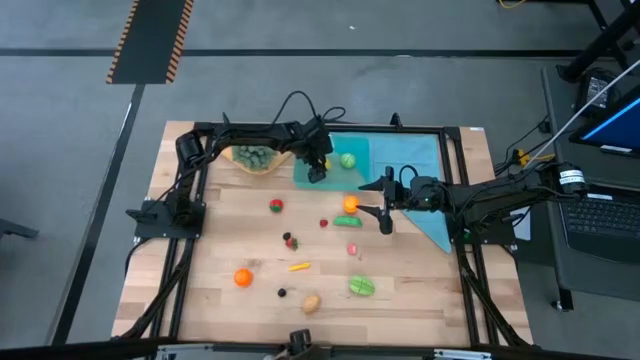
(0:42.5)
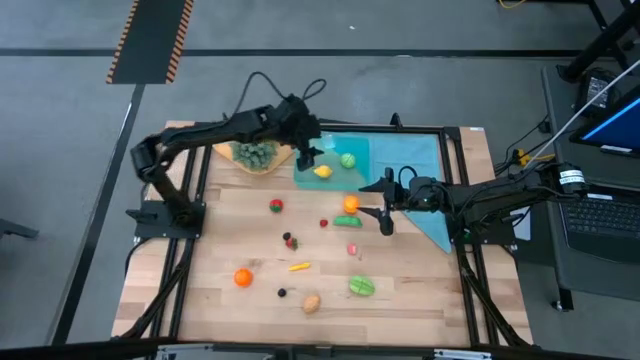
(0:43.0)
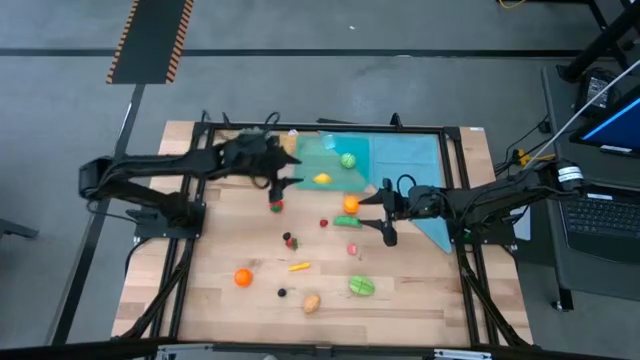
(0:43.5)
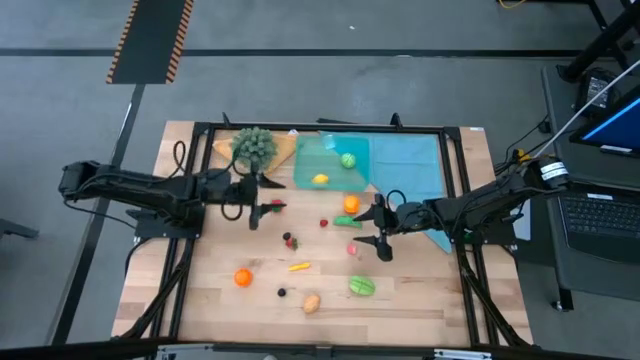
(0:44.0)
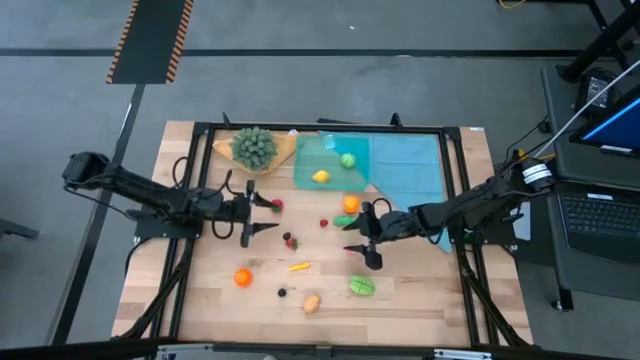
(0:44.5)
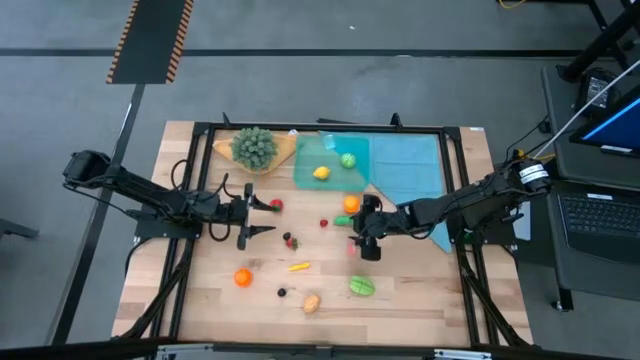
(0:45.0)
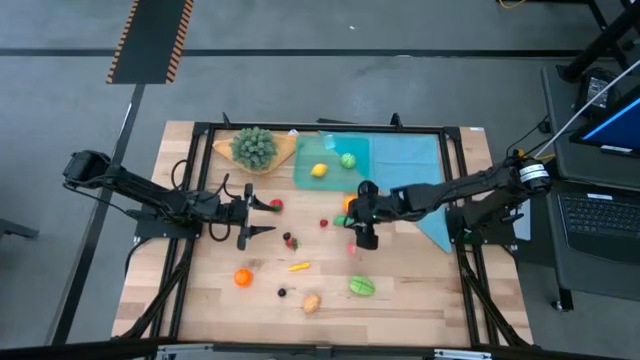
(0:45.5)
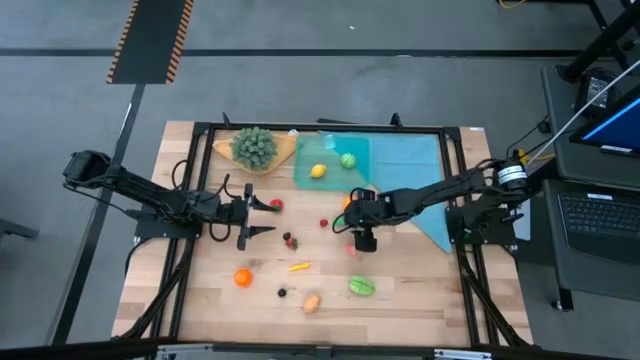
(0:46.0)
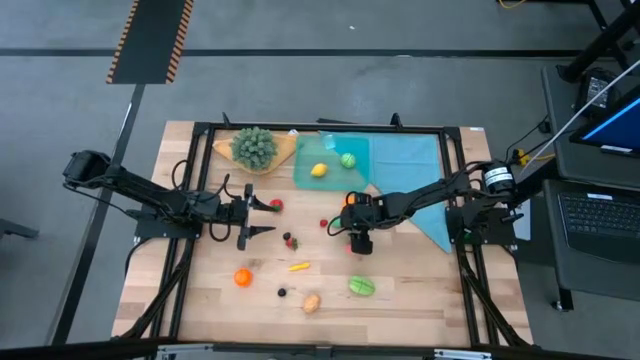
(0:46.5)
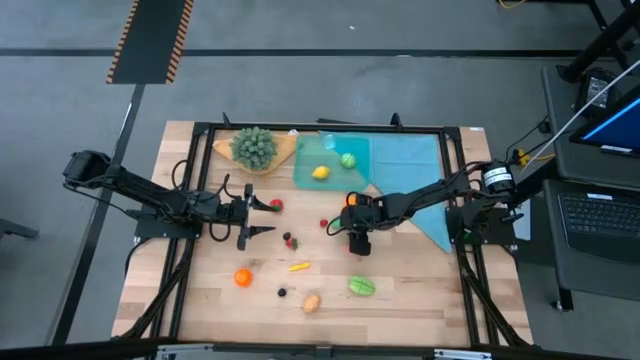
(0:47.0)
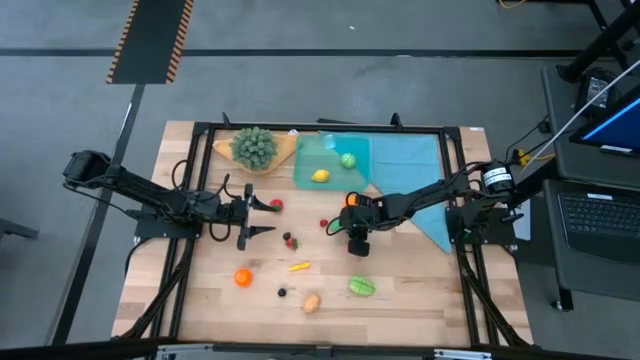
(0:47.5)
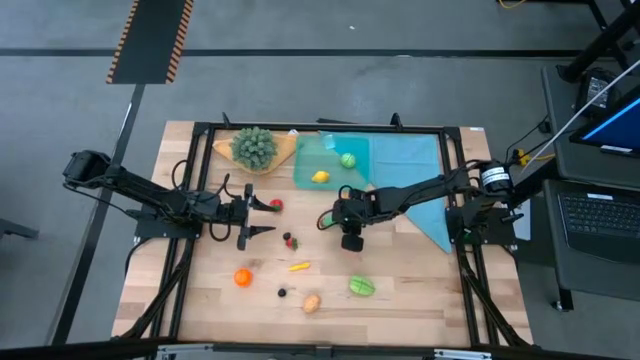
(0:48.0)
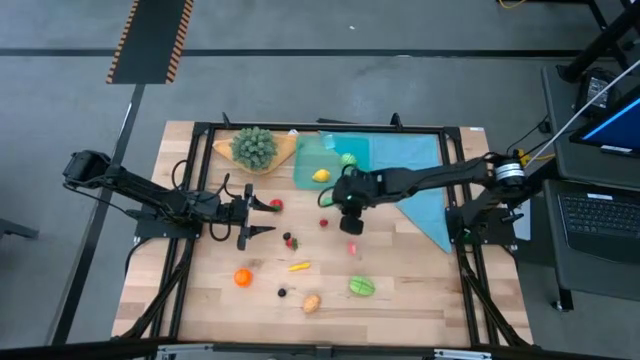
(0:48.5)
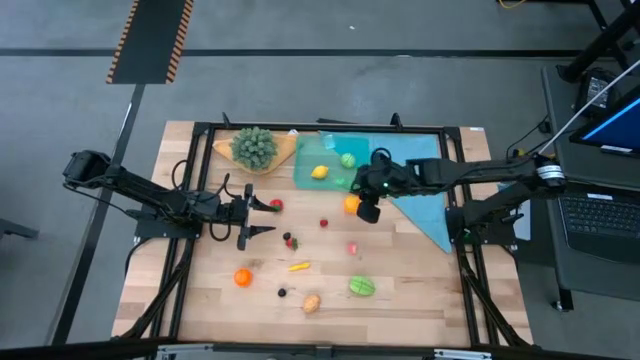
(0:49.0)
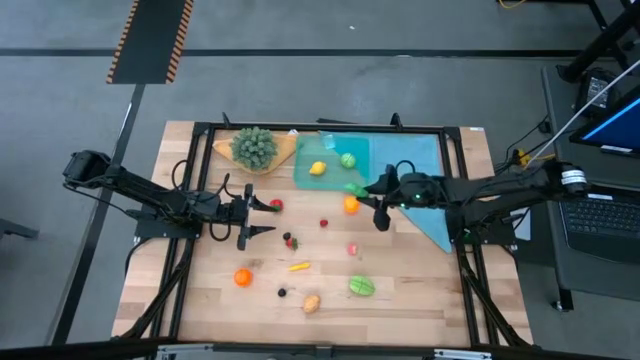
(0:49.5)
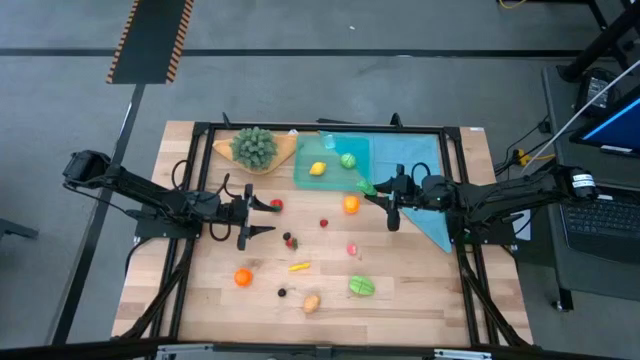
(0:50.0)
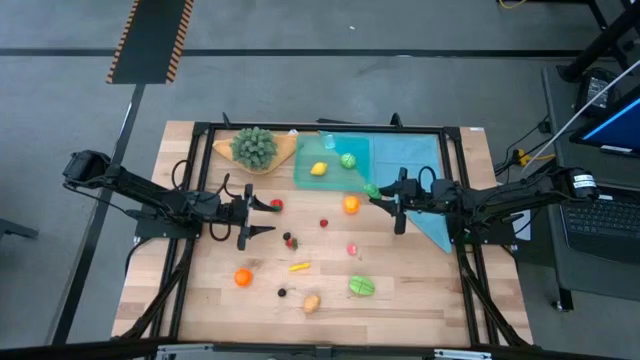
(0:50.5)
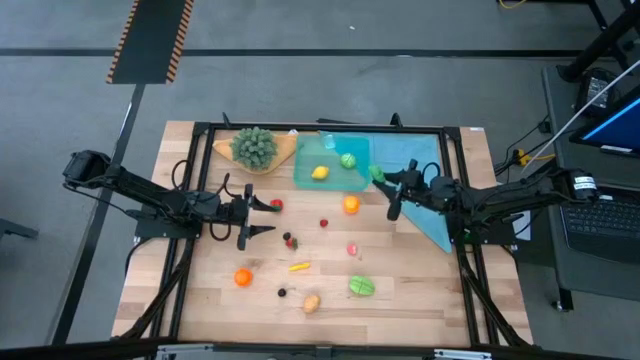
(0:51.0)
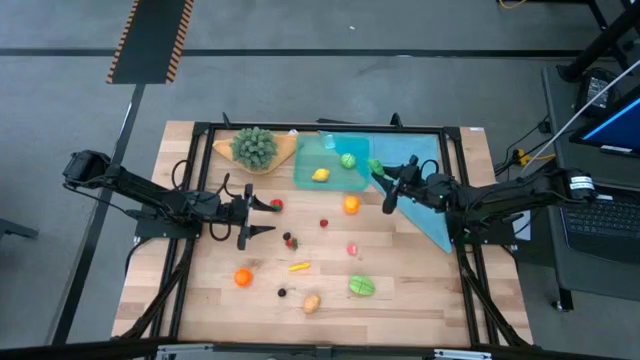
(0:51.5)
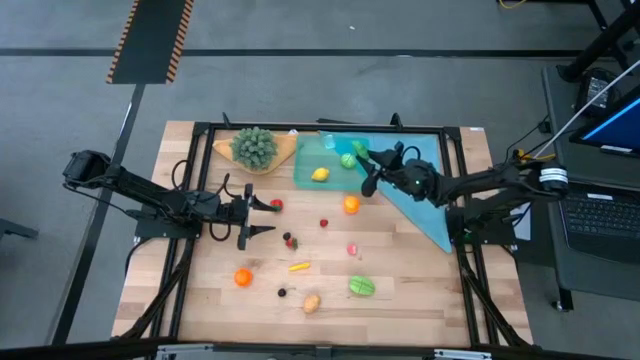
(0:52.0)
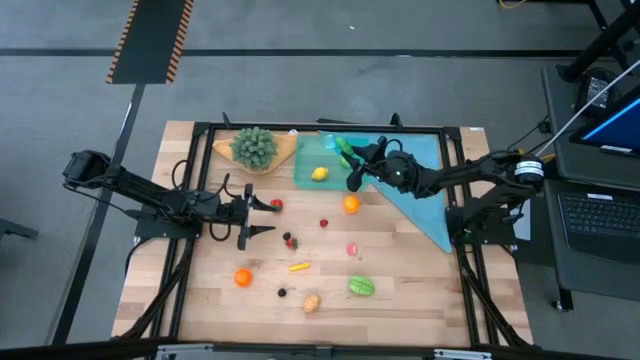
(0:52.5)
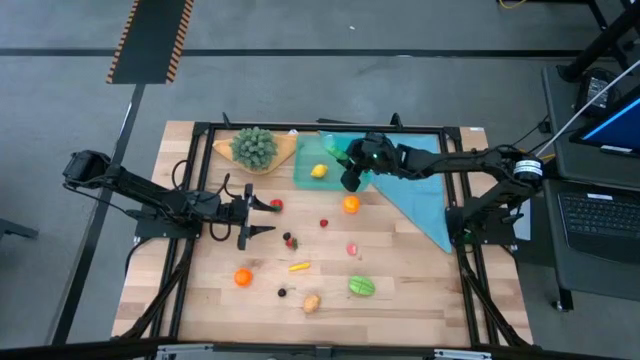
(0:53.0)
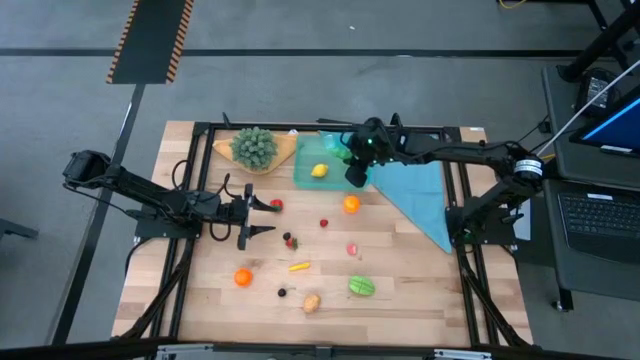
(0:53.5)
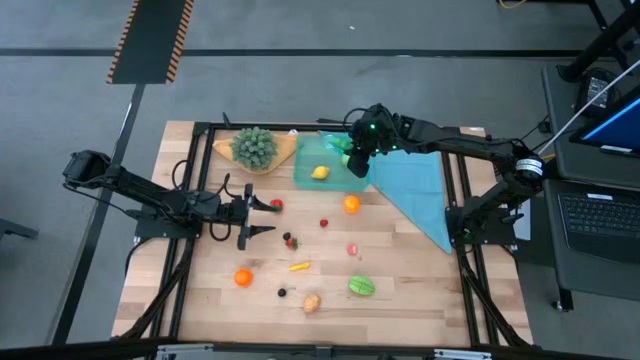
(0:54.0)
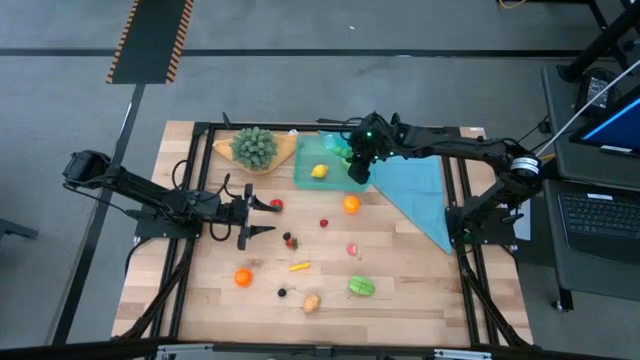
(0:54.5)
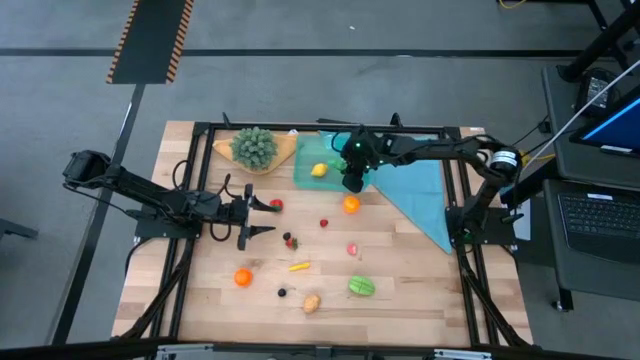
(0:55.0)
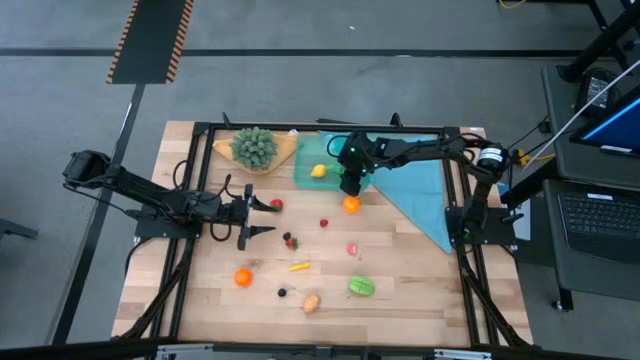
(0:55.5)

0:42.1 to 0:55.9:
Task: Pick and placing Produce into tupperware
Put the snap peas into the blue bin
